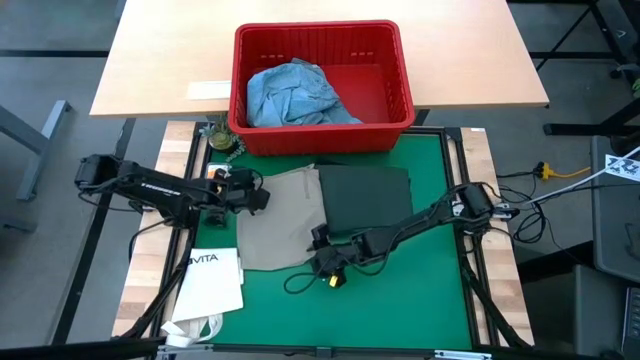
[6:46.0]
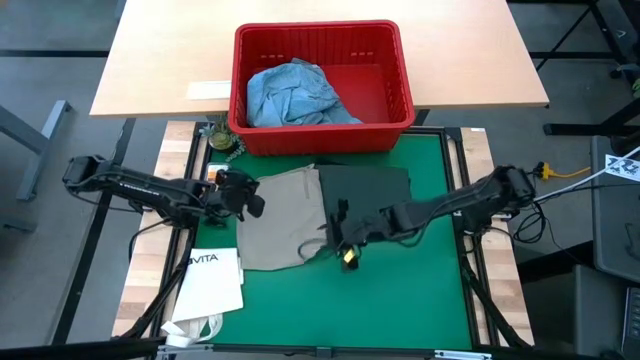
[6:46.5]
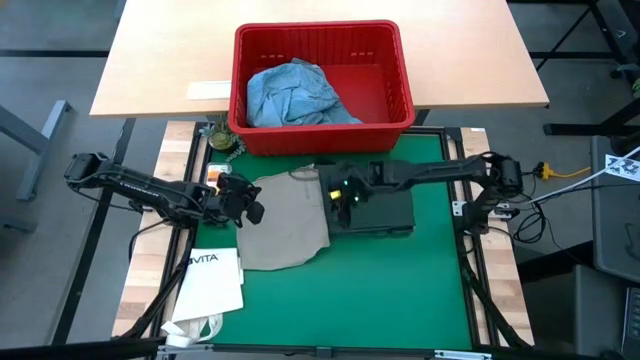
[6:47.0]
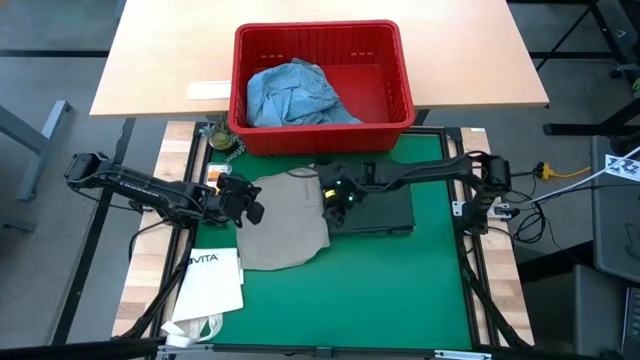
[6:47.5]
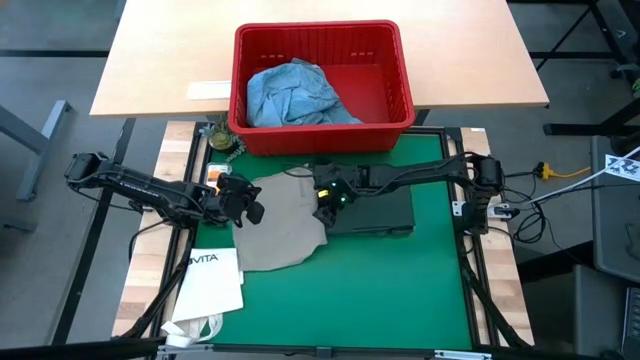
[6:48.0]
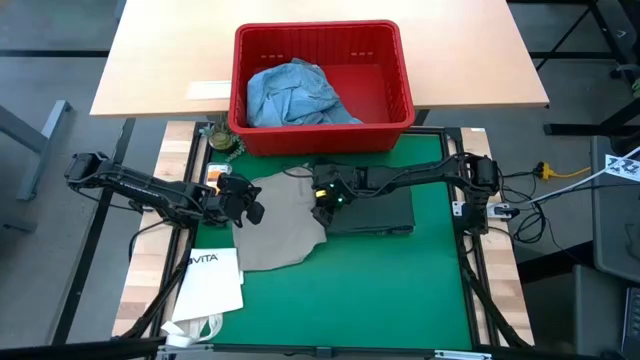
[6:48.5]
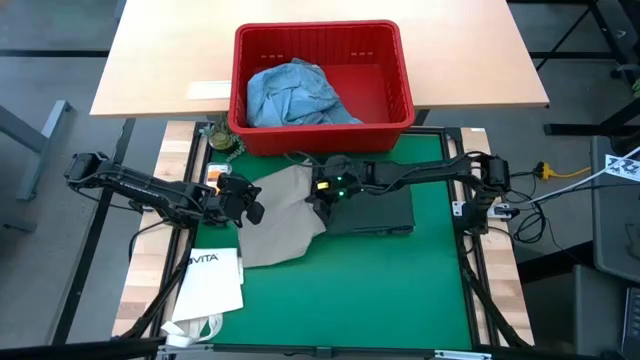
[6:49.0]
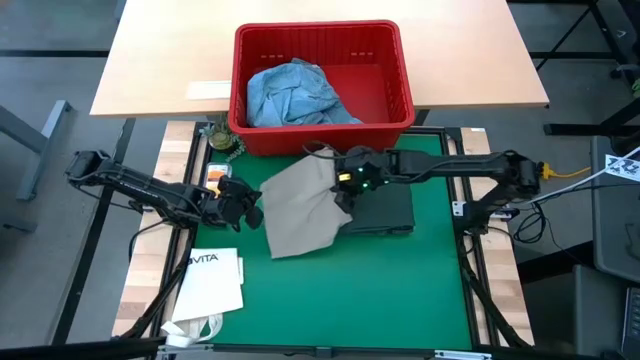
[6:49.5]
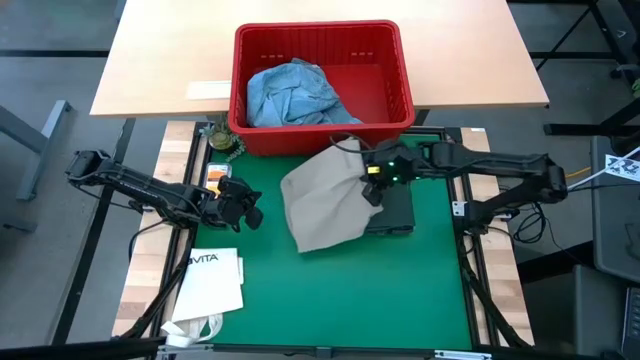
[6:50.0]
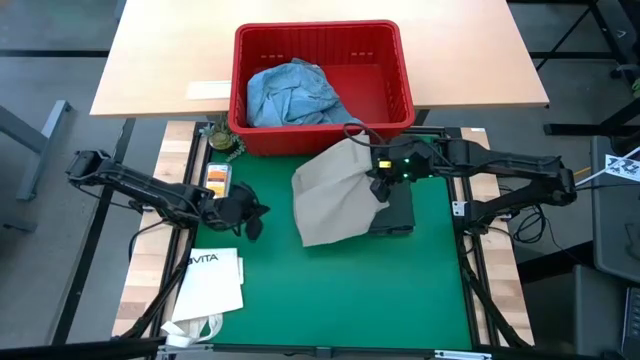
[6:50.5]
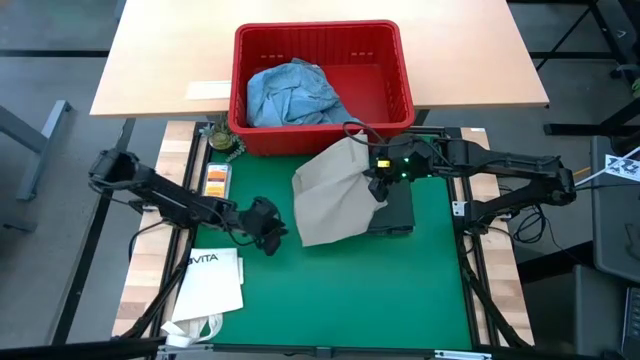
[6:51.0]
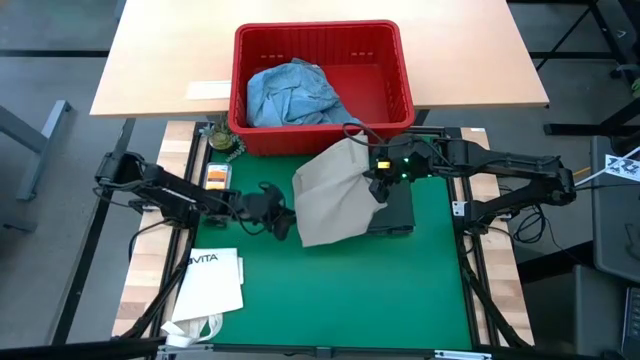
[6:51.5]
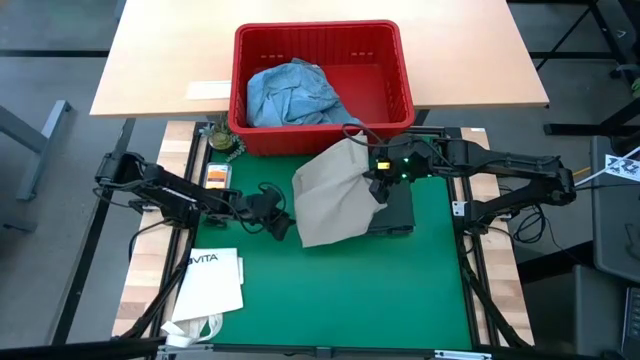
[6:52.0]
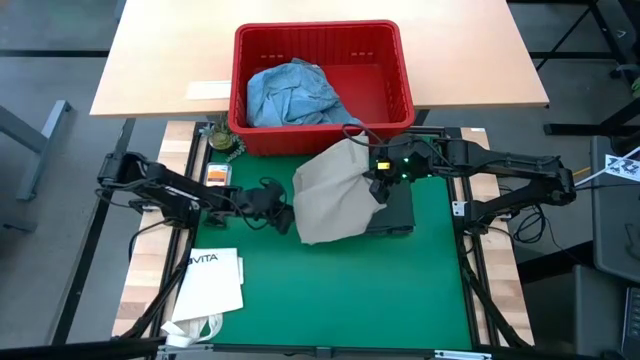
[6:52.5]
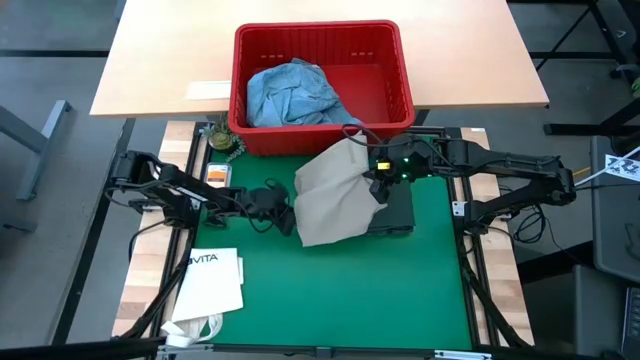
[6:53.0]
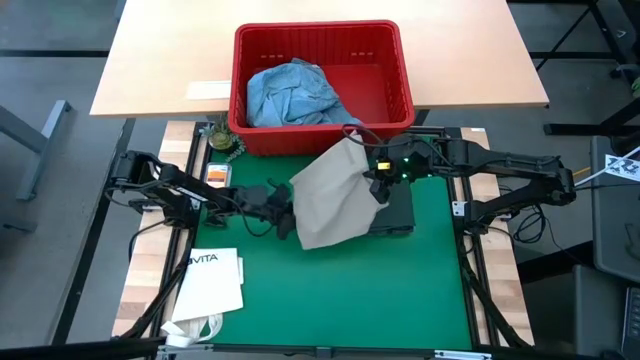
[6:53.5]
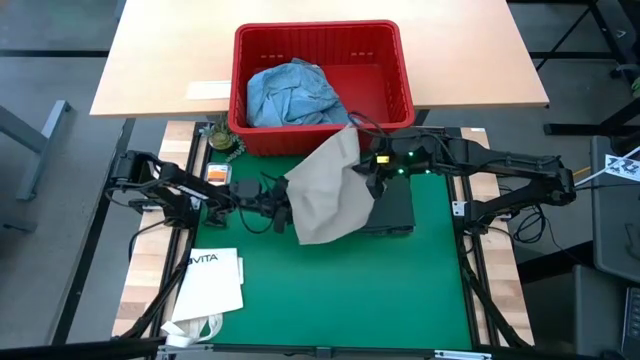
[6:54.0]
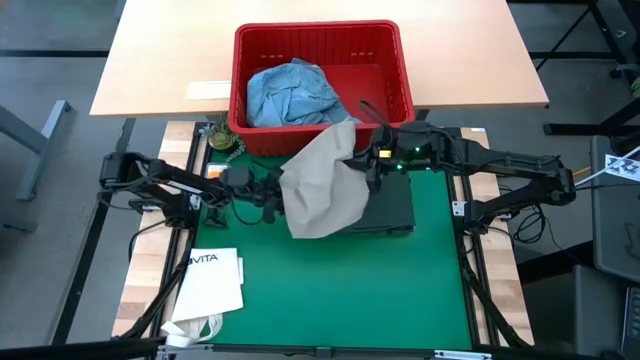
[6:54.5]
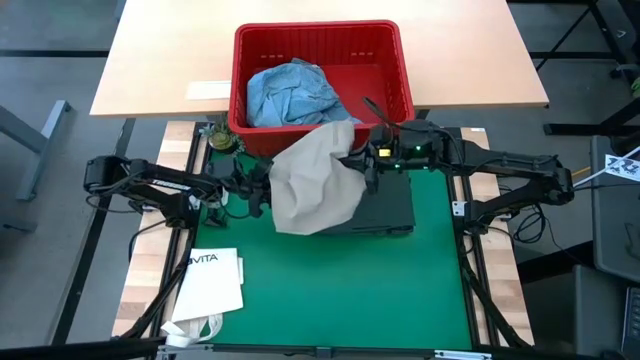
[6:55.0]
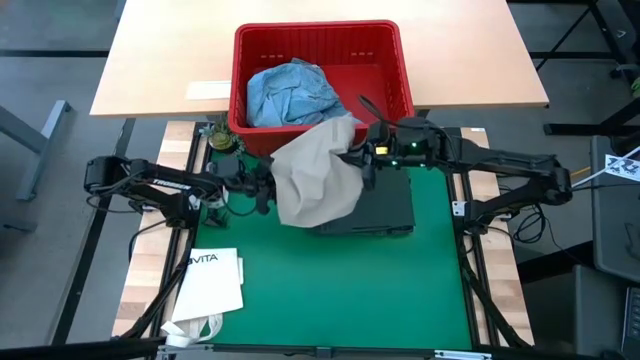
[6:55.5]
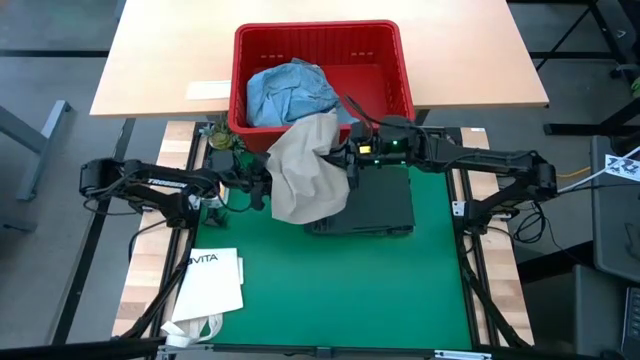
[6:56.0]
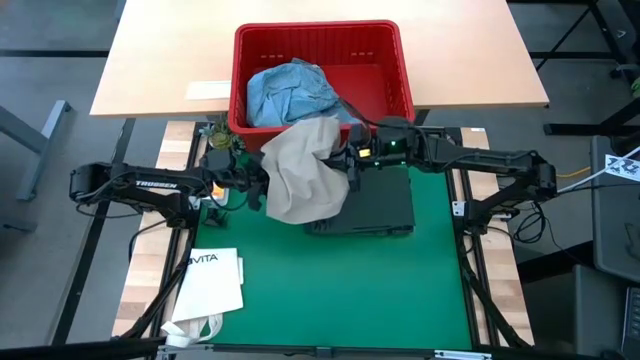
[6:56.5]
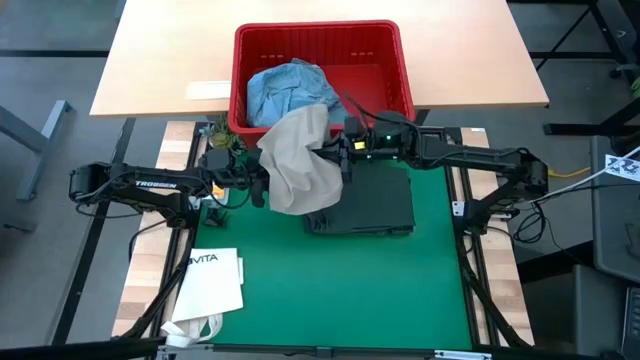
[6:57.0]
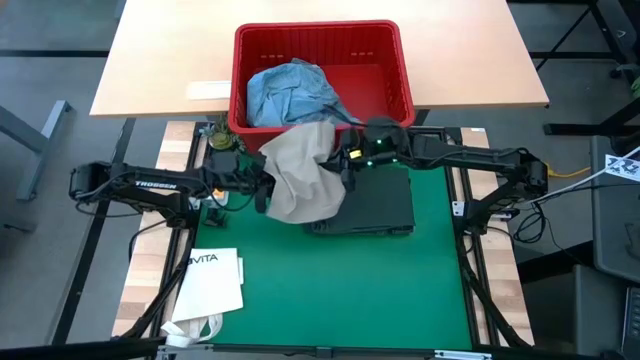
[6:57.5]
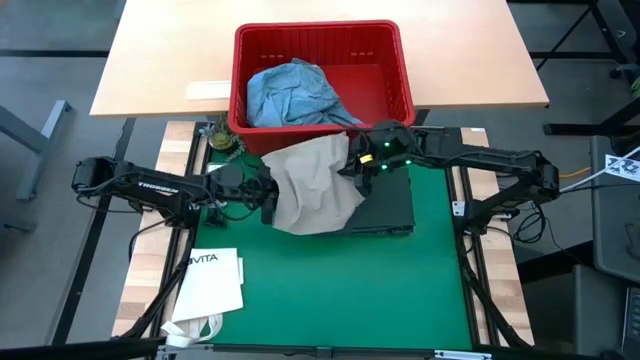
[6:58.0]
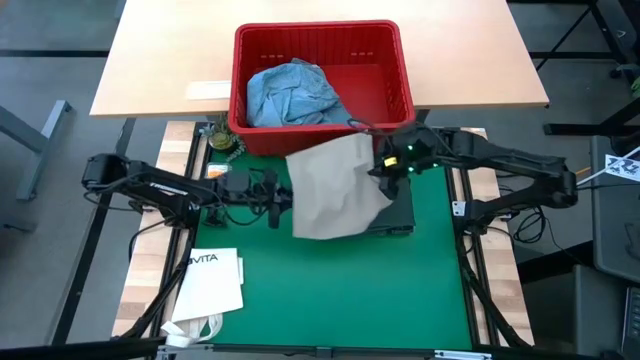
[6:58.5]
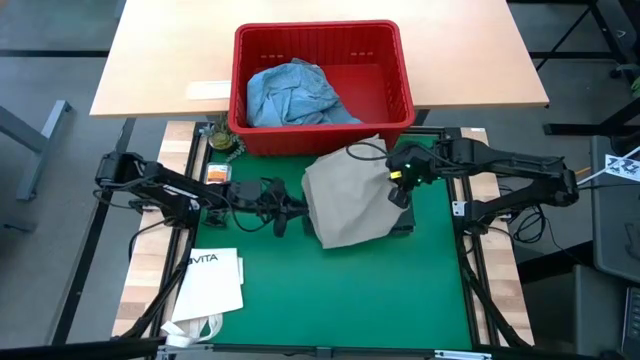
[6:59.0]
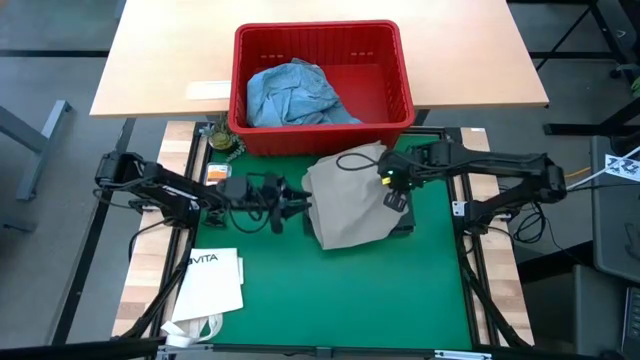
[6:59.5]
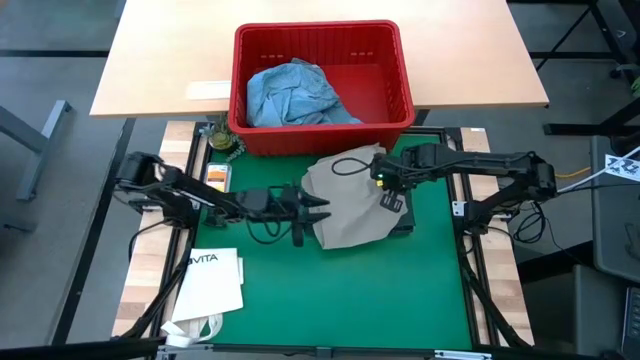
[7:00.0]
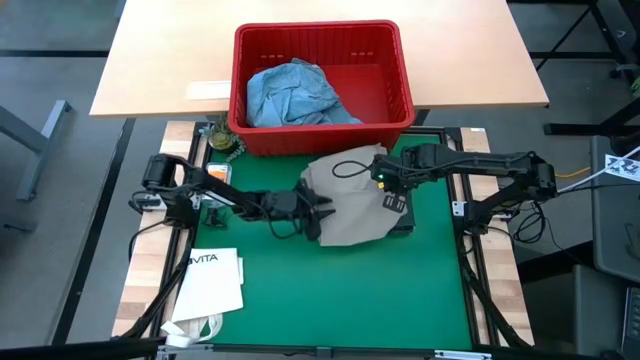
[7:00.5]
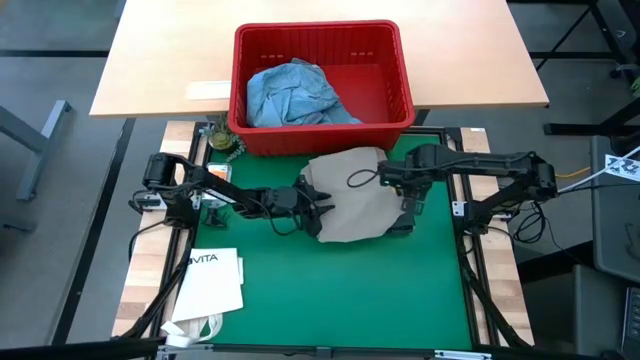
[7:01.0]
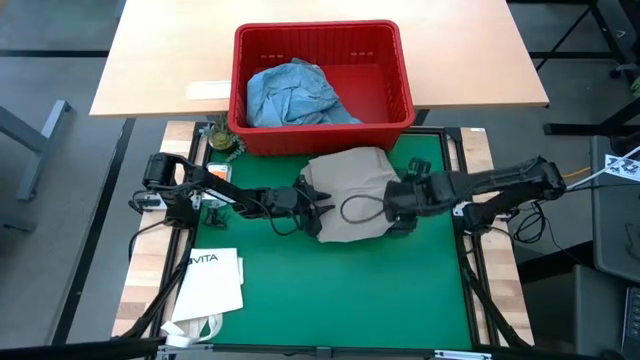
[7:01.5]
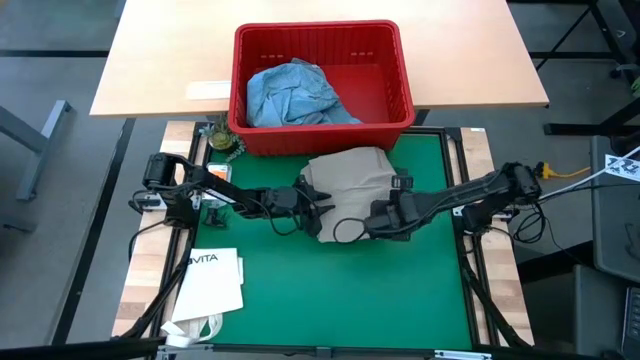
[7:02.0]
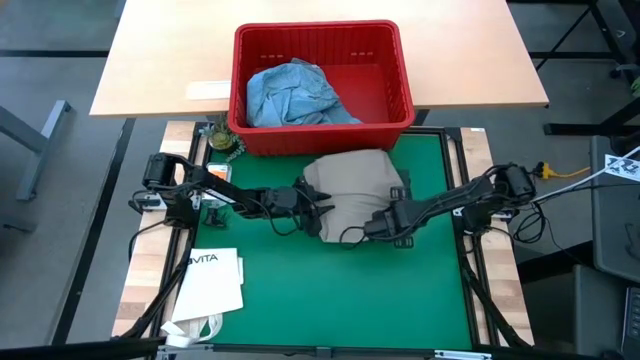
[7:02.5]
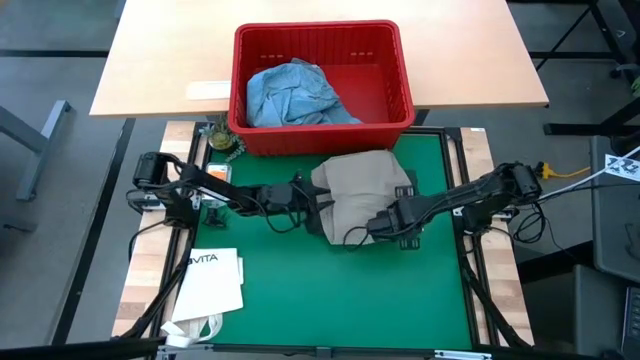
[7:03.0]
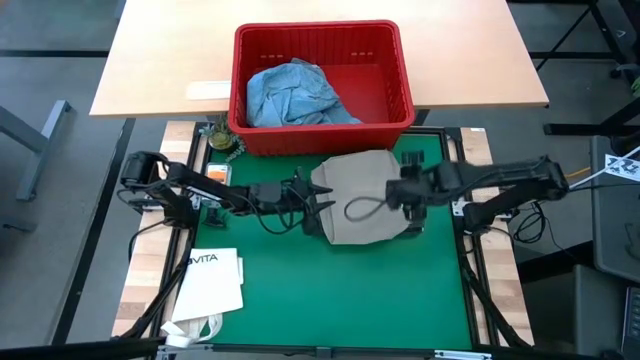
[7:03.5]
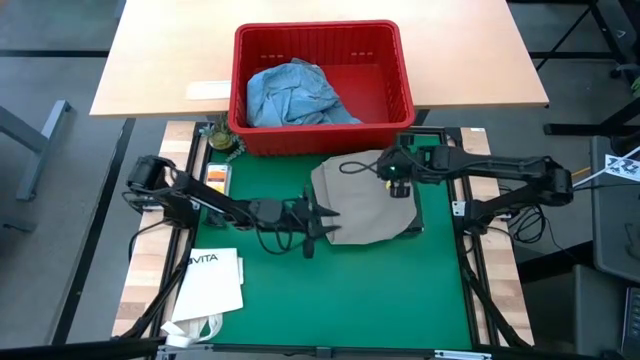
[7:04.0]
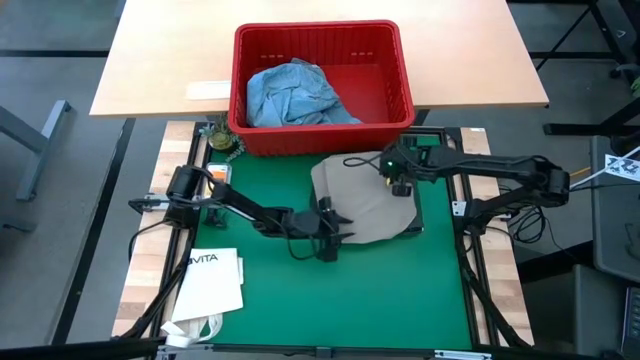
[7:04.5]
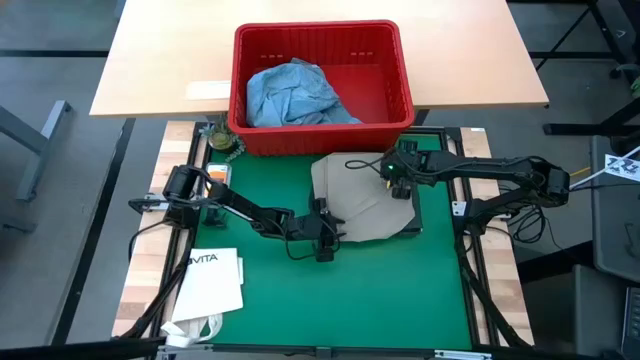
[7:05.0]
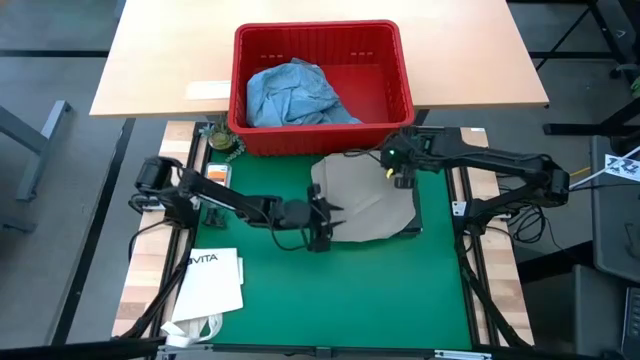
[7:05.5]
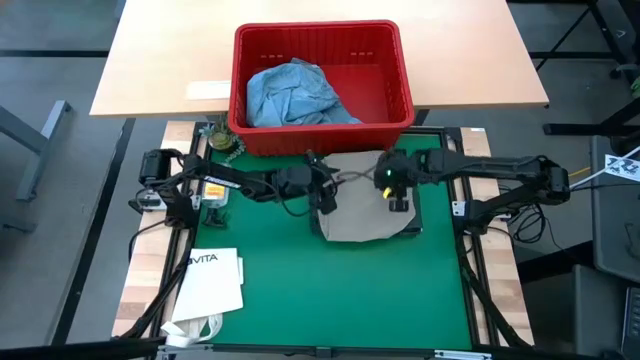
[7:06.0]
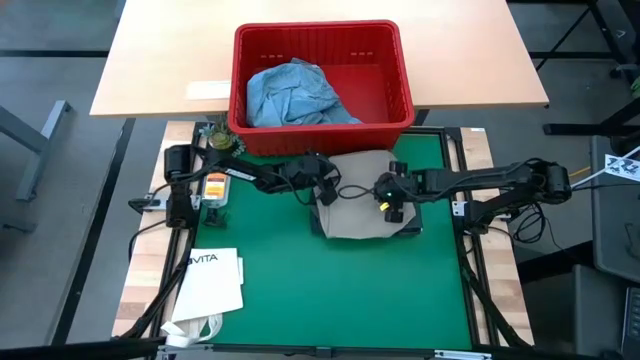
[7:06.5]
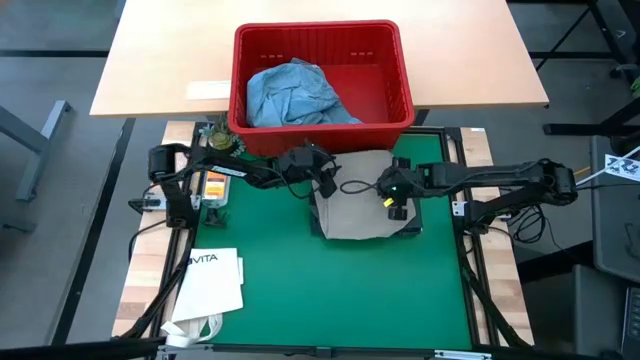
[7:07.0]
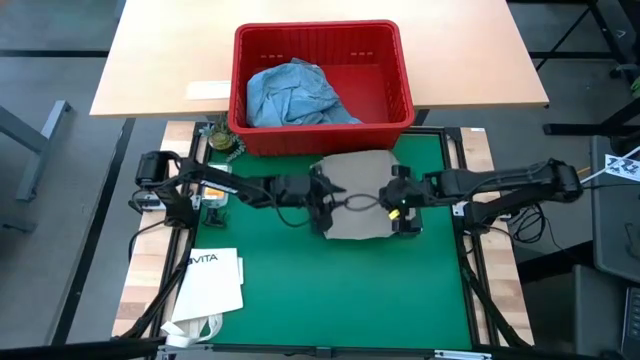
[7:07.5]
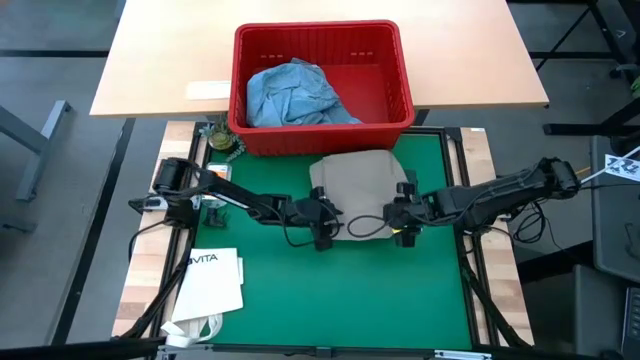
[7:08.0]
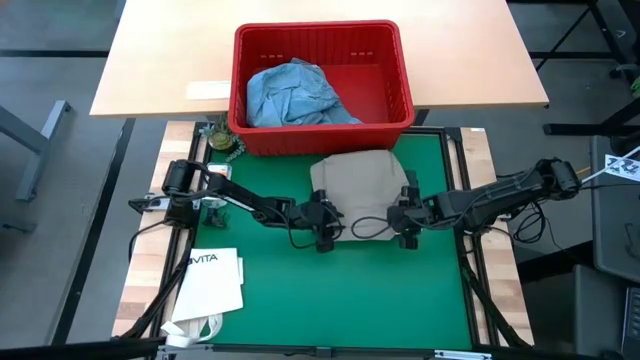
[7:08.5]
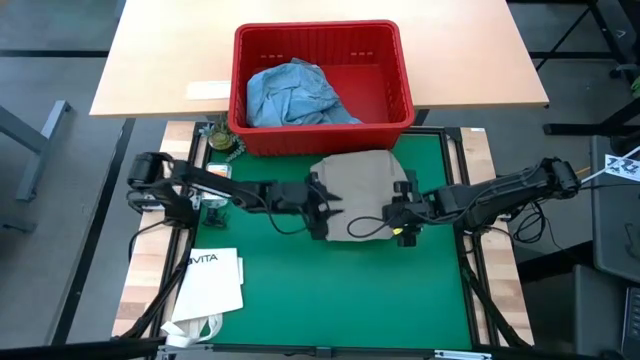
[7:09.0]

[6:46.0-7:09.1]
Task: Fold Laundry from Bin
Stack the gray shorts on top of the green shirt
